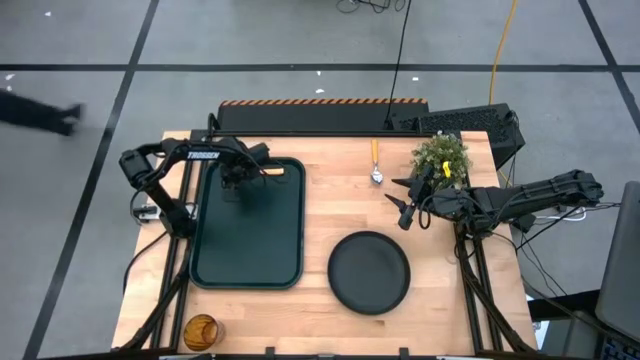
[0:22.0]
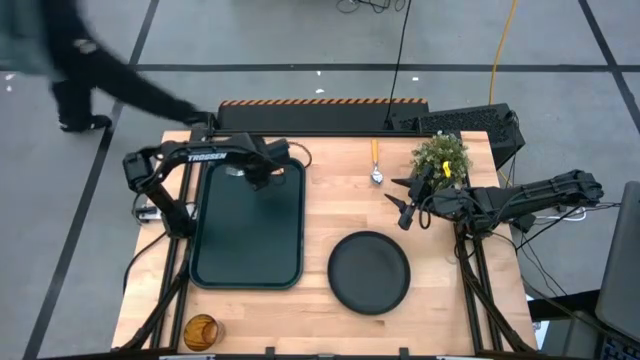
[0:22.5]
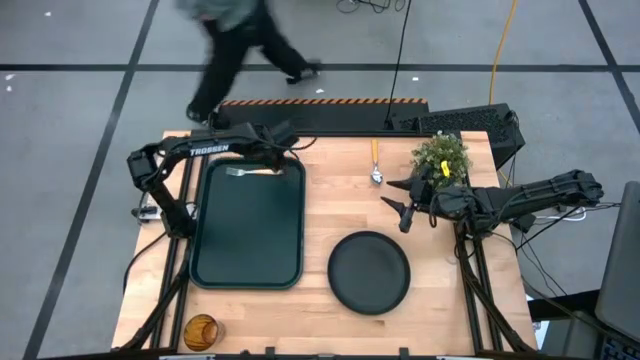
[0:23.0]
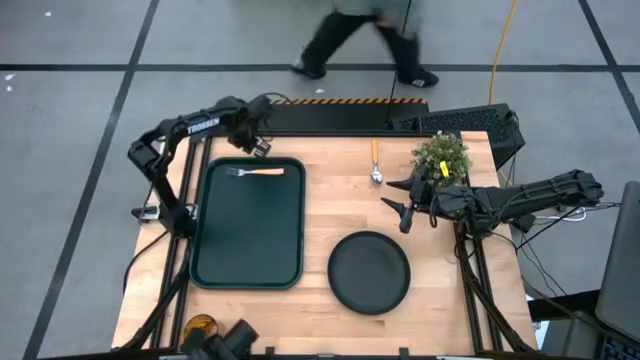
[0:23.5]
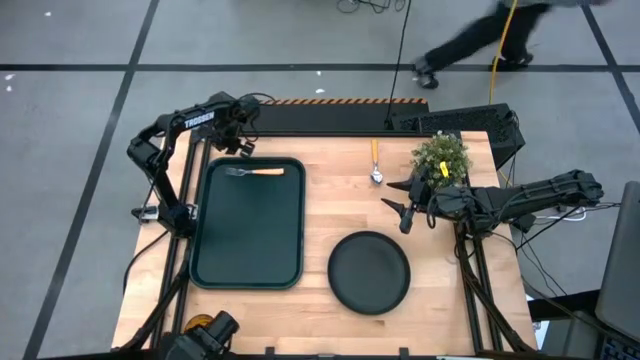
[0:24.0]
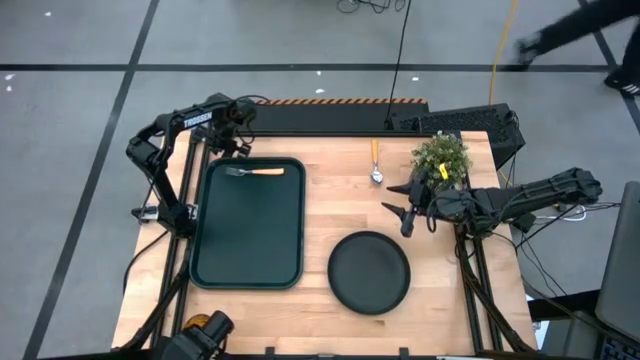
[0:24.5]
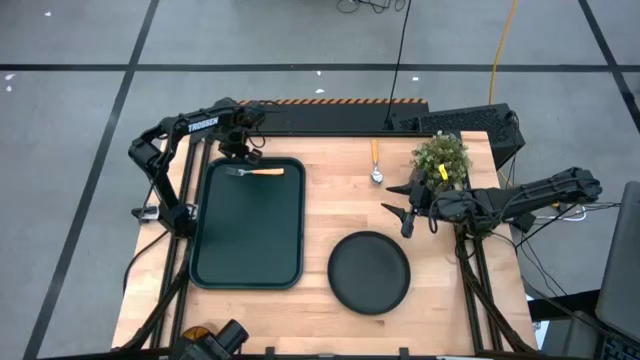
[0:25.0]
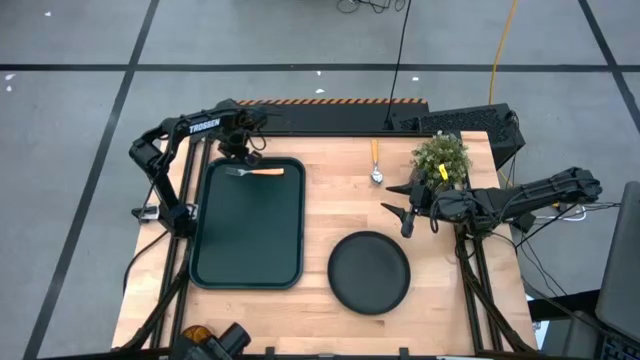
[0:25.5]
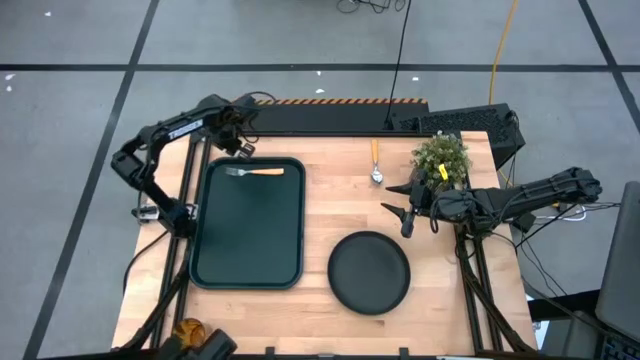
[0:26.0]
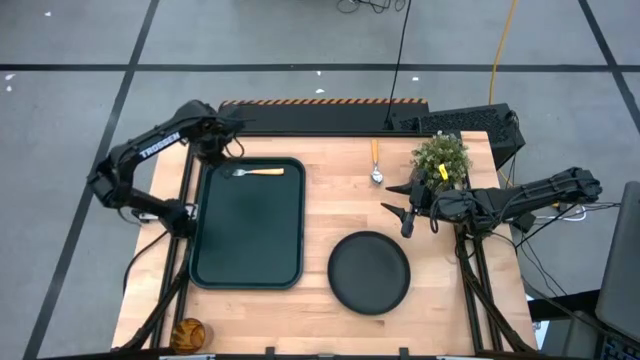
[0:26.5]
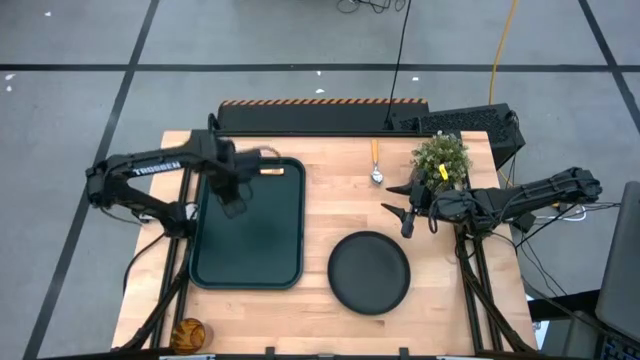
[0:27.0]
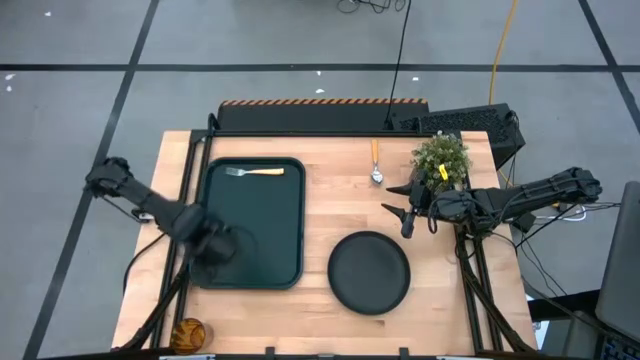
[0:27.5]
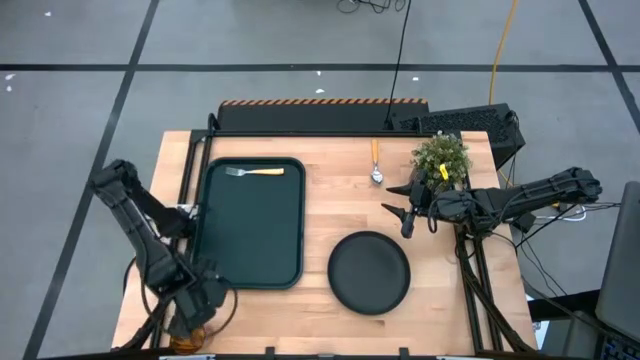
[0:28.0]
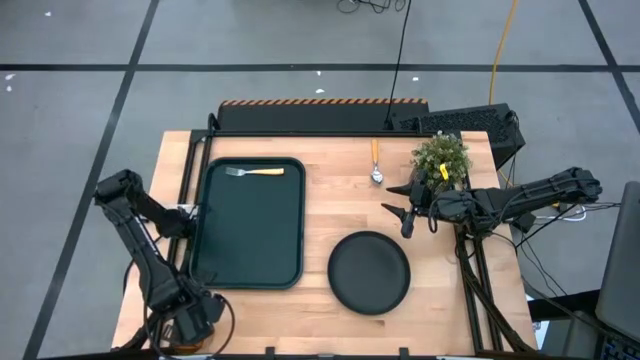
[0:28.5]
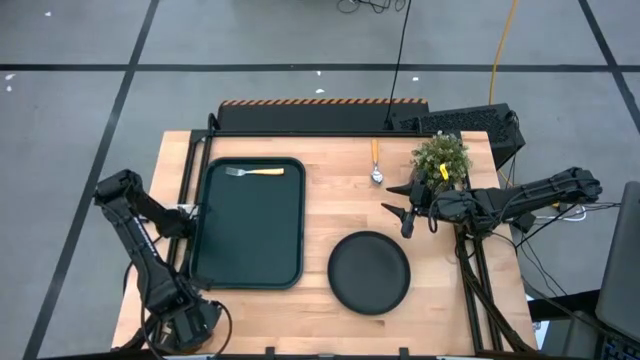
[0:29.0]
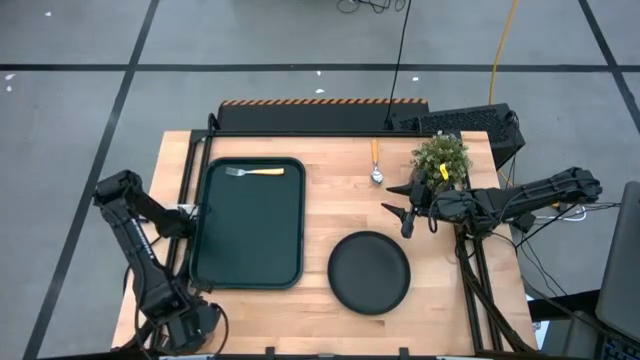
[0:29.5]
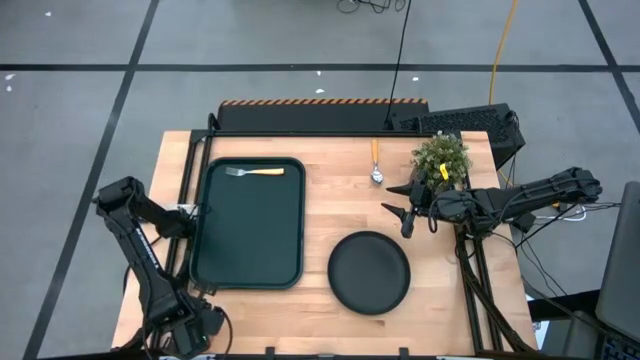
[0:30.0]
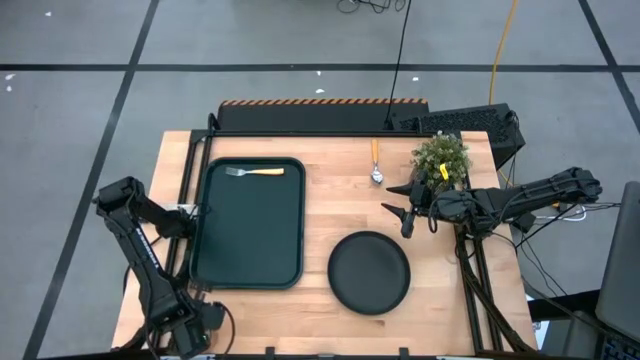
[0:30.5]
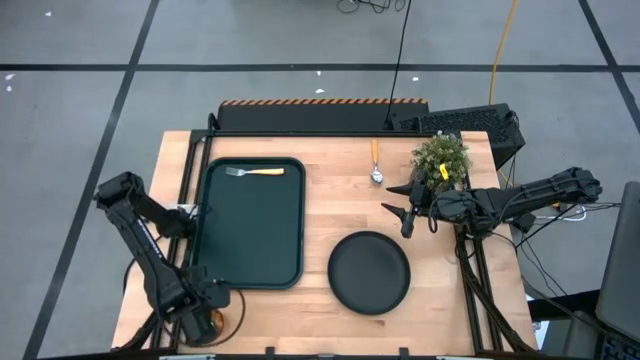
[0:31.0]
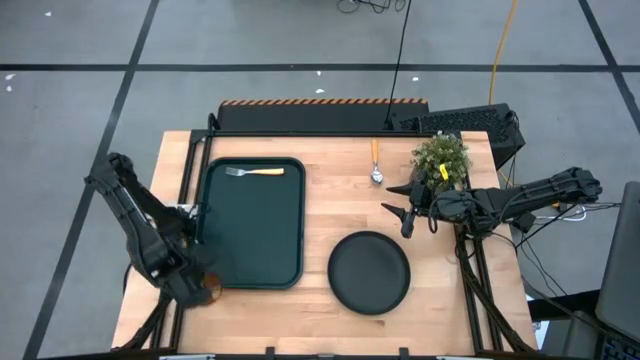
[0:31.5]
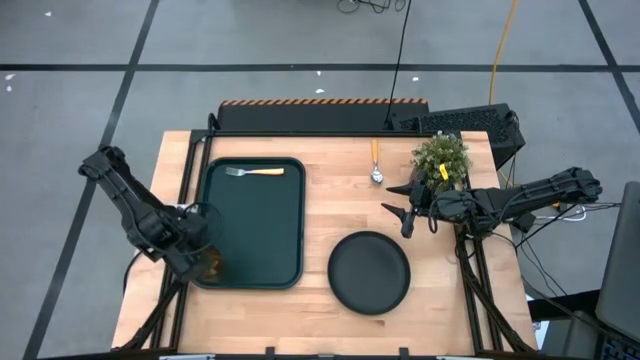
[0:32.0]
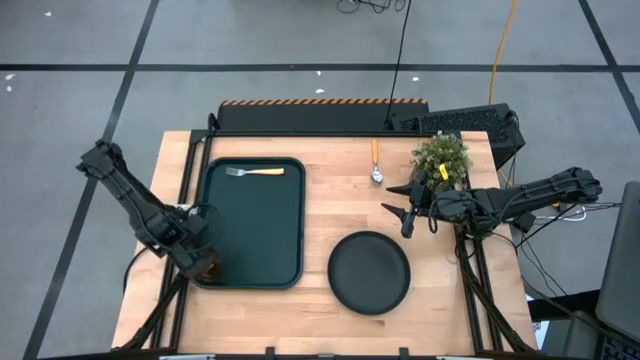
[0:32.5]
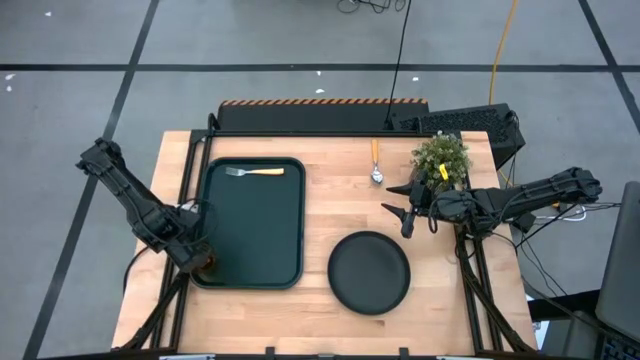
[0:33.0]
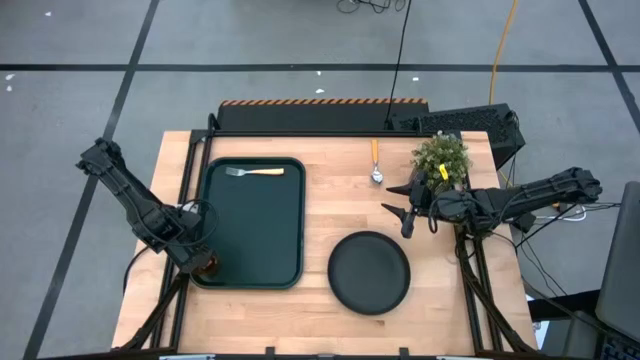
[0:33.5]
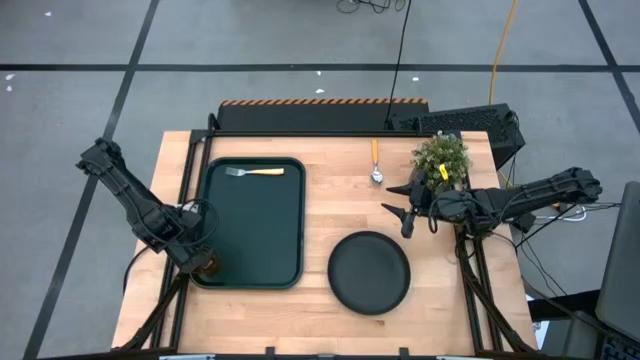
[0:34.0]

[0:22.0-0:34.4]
Task: Pick and place plate/cup/fork/spoon on tray
Put the brown glass on the black tray

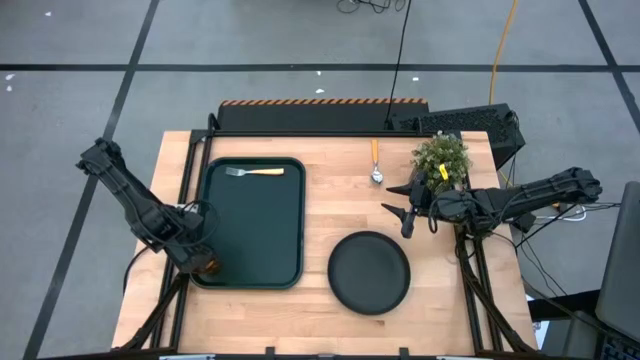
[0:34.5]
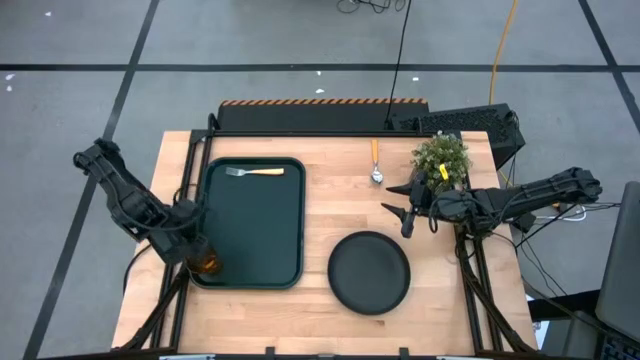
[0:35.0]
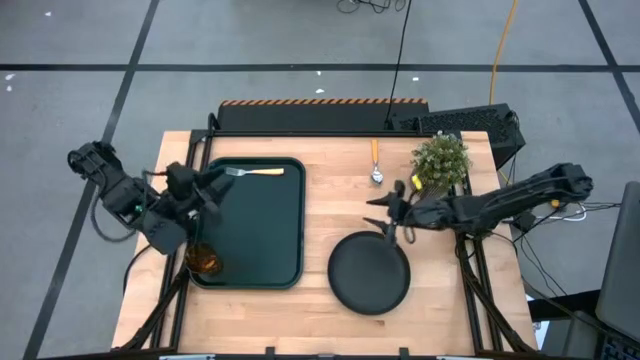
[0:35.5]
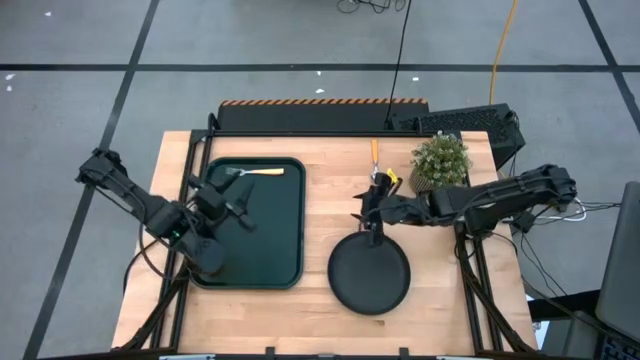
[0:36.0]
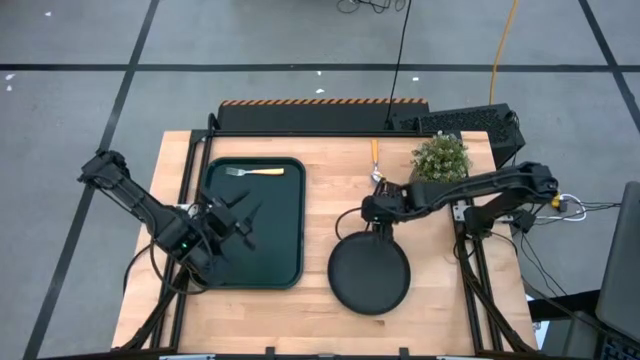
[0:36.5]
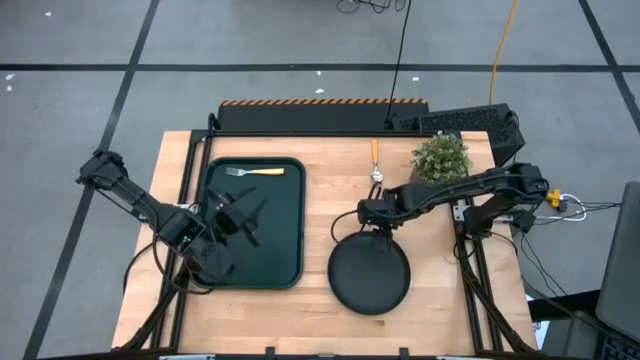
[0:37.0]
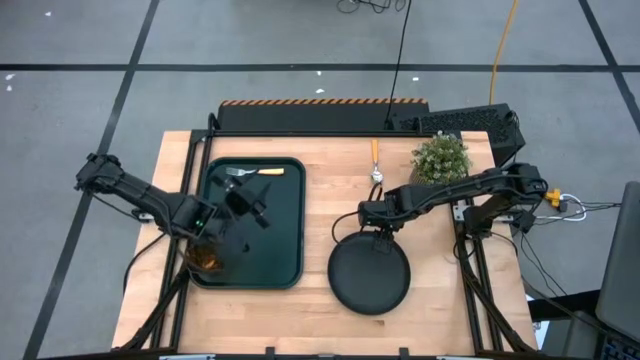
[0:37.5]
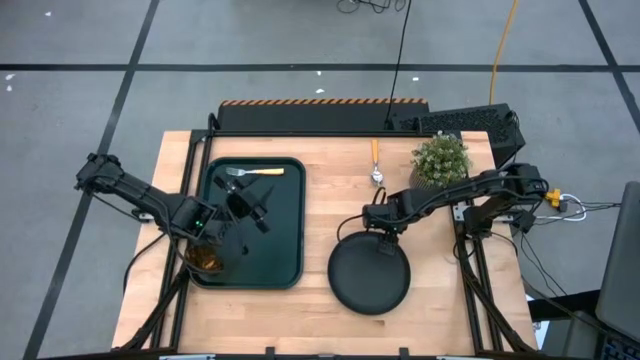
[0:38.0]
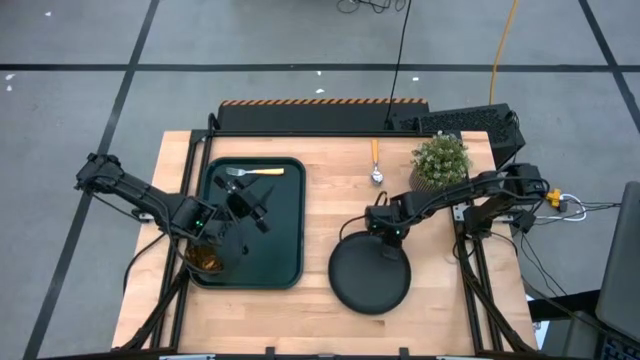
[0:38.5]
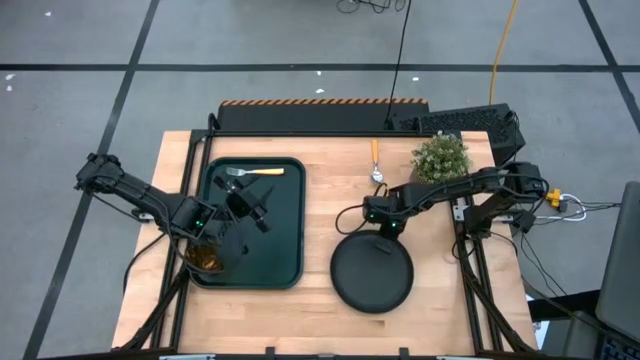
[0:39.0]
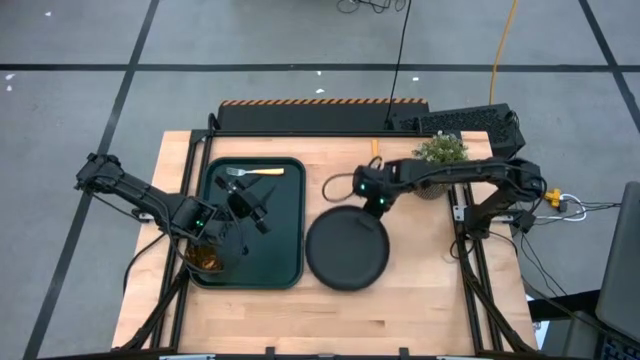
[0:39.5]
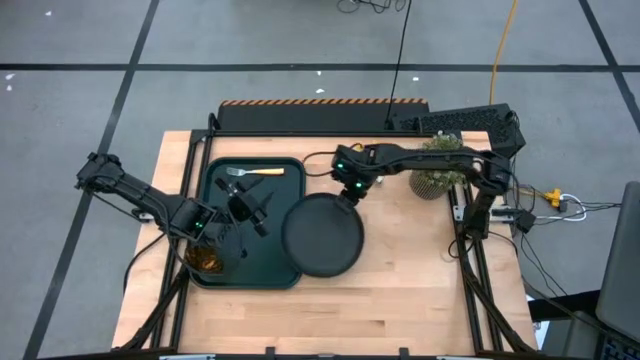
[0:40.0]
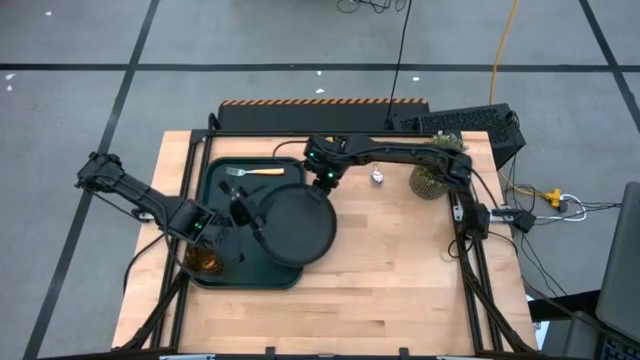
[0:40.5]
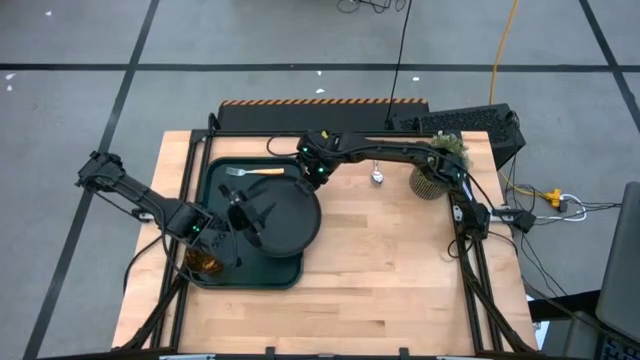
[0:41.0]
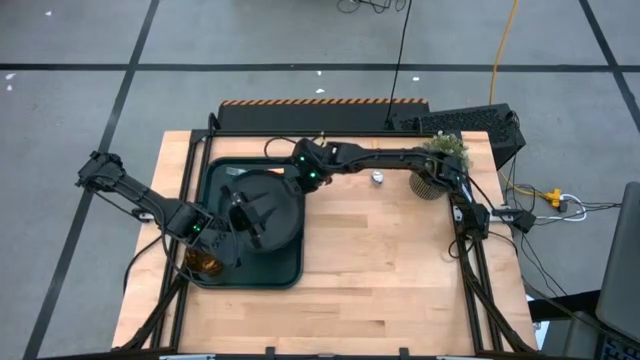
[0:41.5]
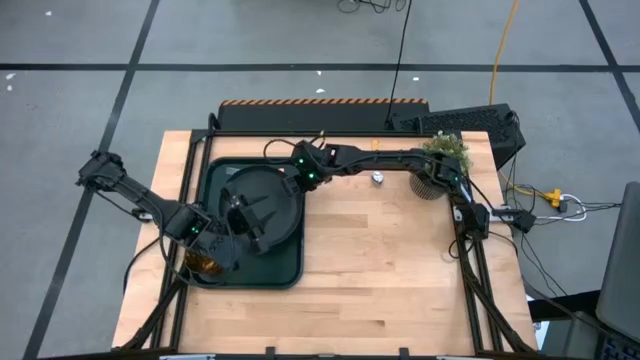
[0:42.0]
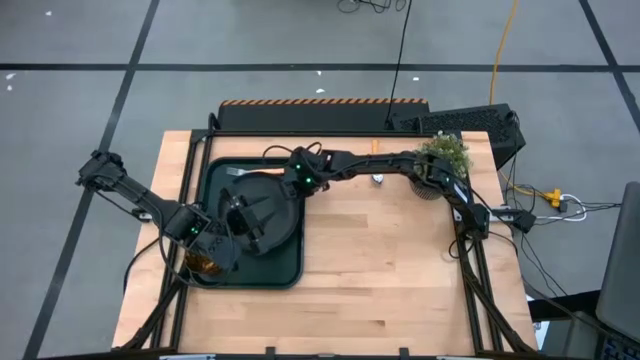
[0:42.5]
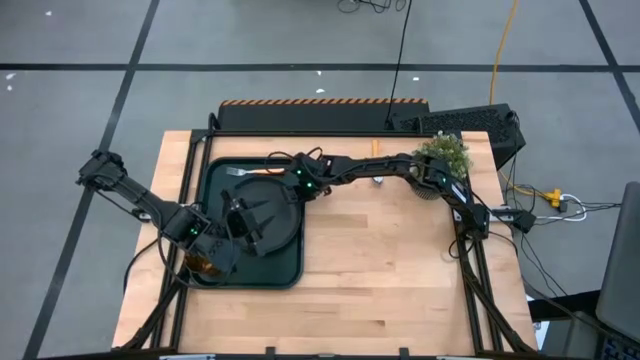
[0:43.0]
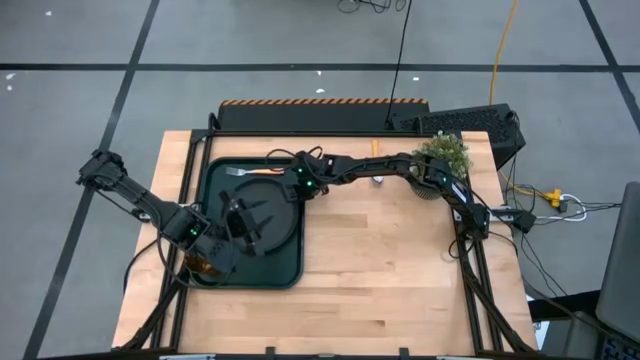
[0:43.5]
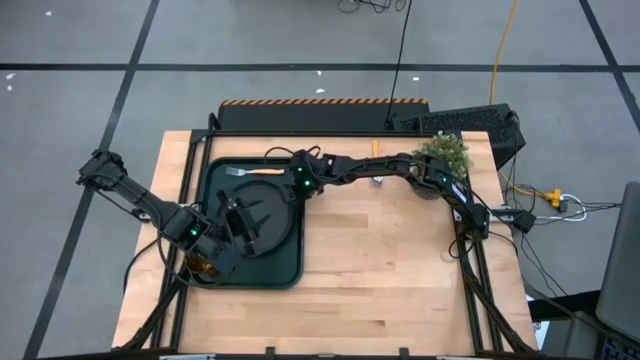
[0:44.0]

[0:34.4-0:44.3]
Put the black plate on the black tray
